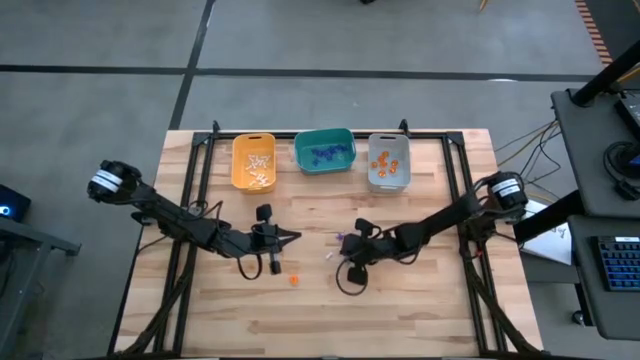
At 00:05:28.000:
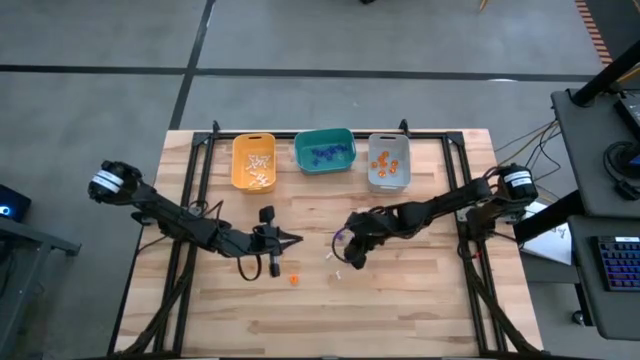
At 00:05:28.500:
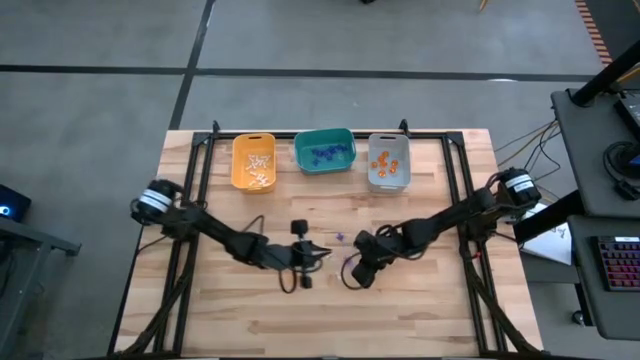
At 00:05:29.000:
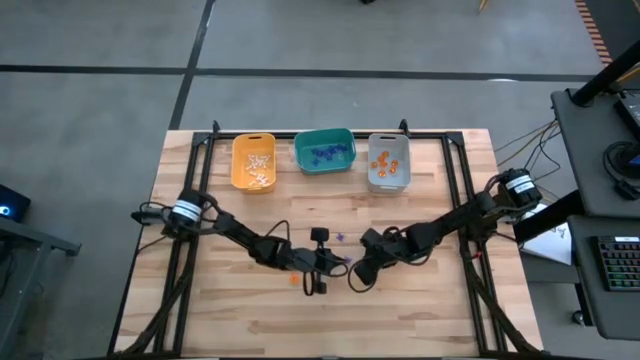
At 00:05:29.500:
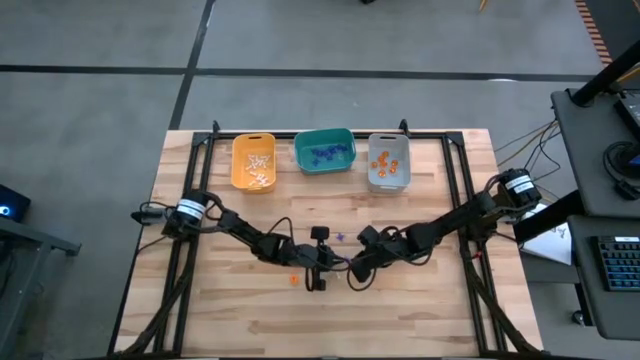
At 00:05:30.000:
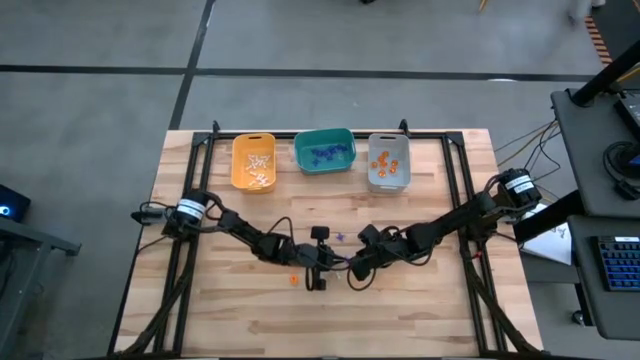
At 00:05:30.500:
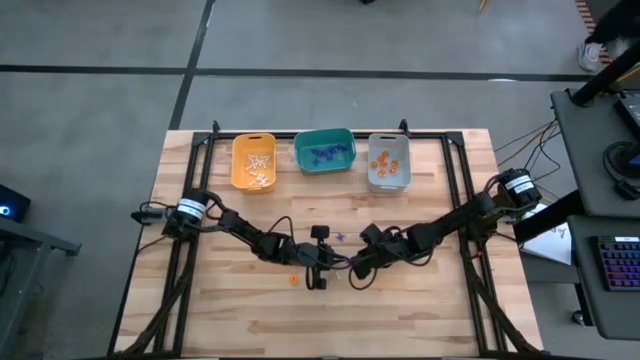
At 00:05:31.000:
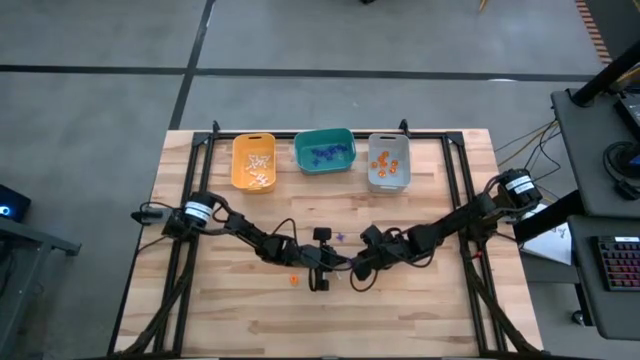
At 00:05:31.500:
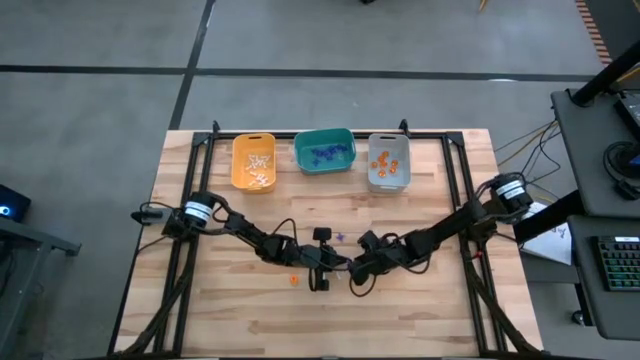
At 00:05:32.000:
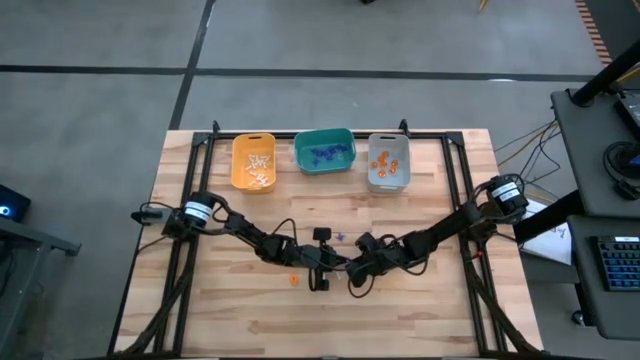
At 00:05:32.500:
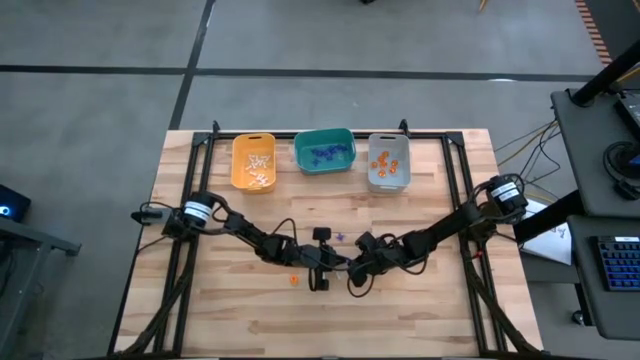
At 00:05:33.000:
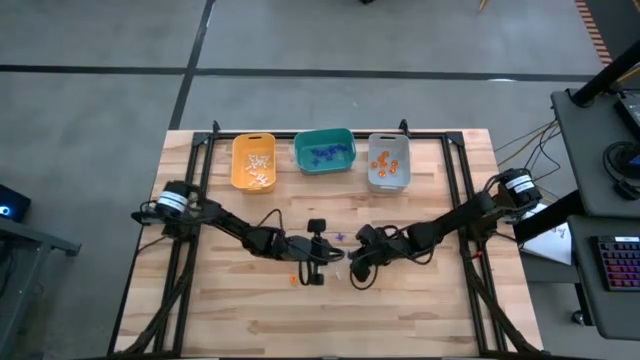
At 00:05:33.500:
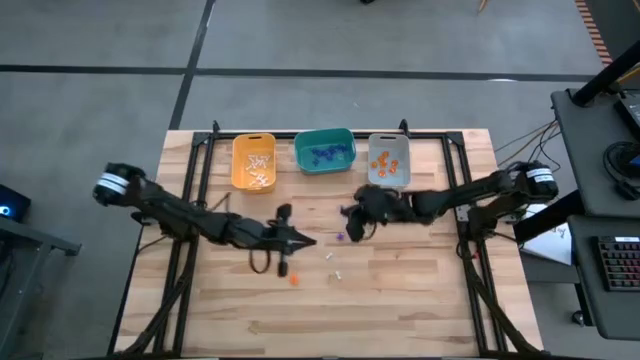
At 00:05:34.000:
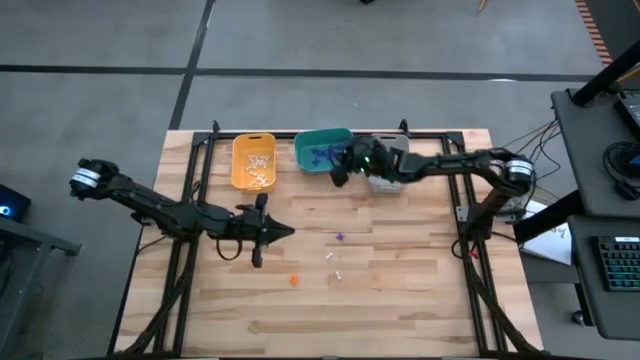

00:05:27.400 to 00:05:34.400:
Task: Sort Halloween decoration
Put the violet spider toy into the green bin

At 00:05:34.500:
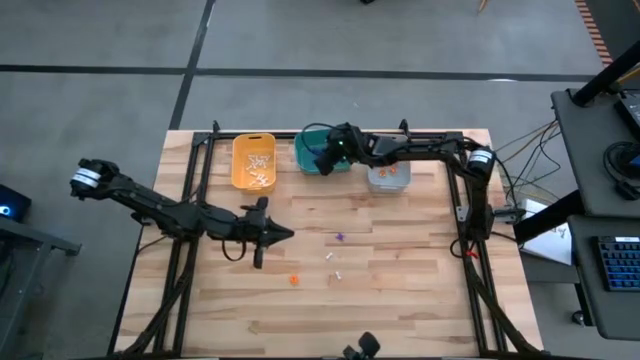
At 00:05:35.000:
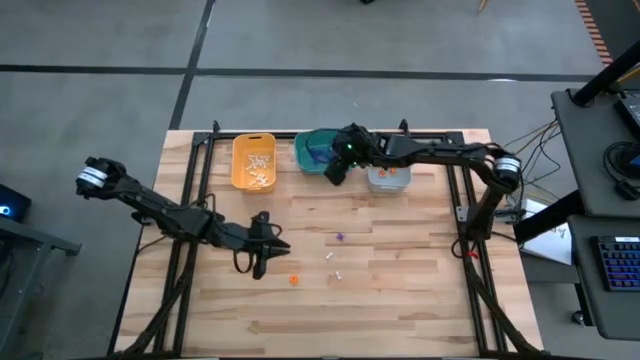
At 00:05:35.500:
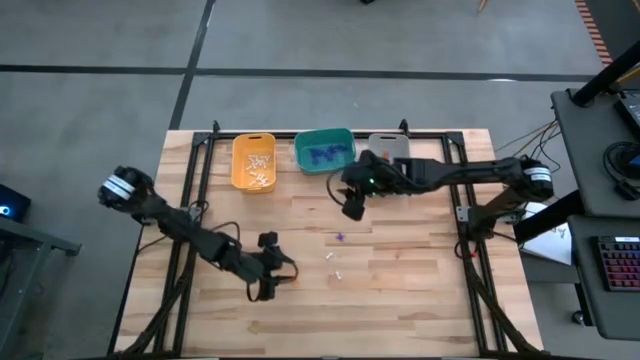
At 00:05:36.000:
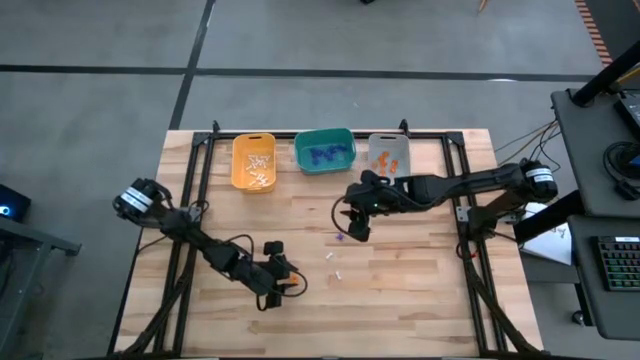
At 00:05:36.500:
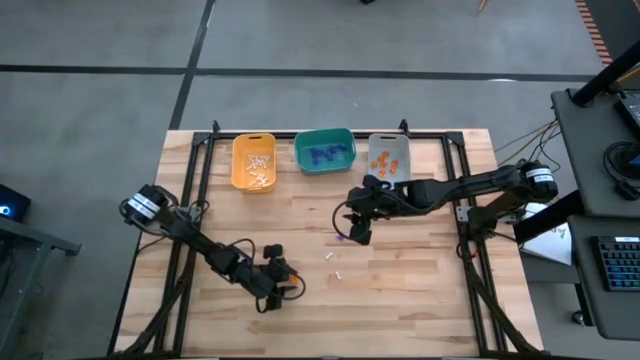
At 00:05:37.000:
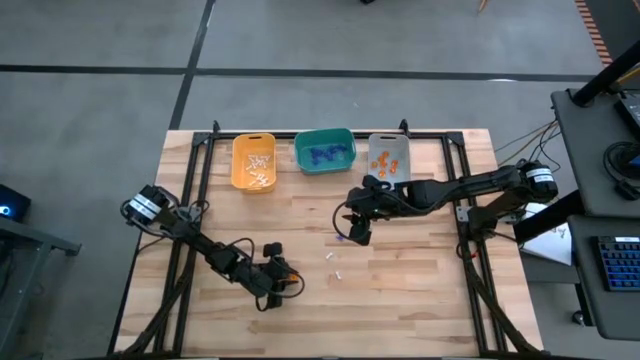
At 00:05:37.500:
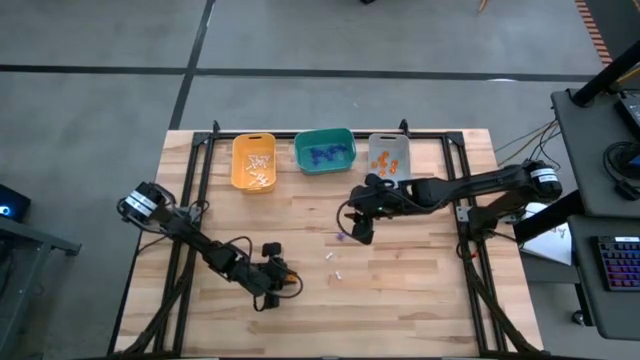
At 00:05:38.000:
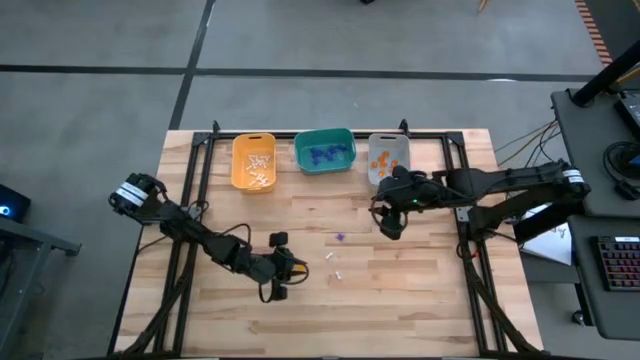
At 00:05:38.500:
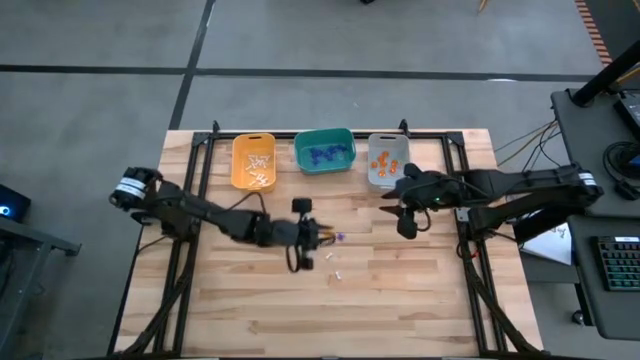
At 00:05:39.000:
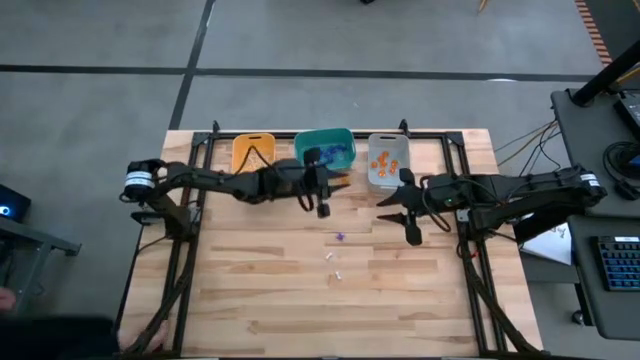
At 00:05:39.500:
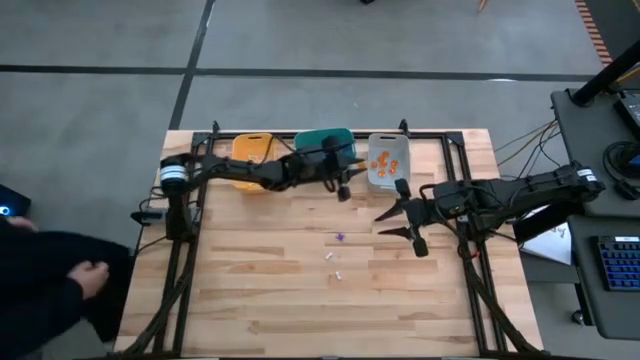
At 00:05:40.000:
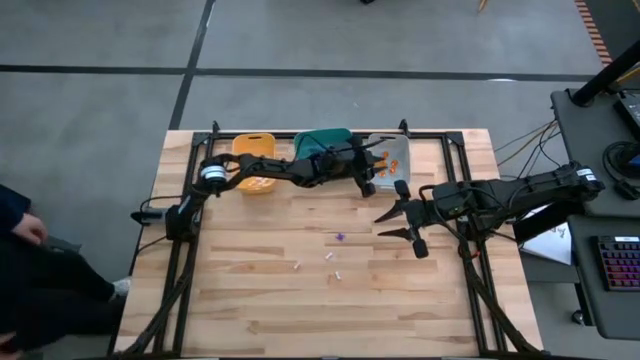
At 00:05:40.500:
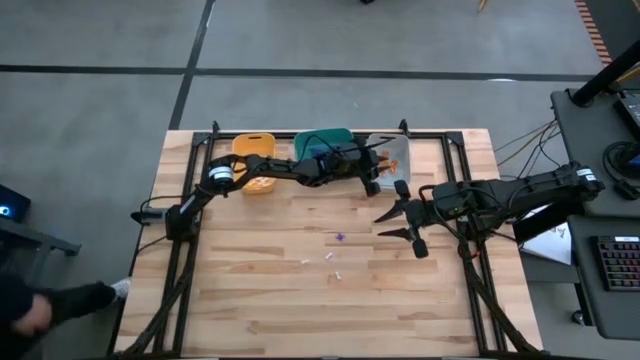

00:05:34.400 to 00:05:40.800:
Put the orange pumpkin into the gray bin

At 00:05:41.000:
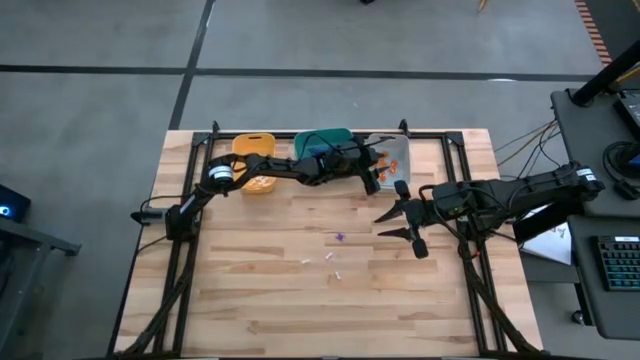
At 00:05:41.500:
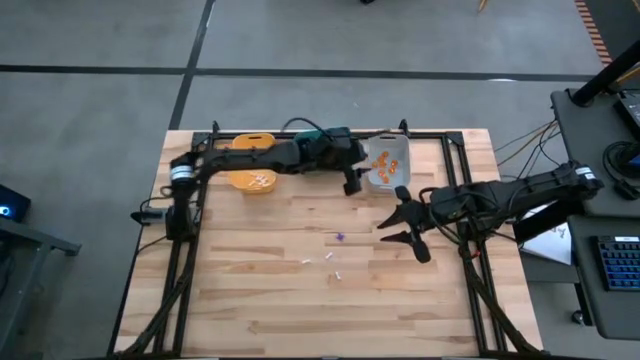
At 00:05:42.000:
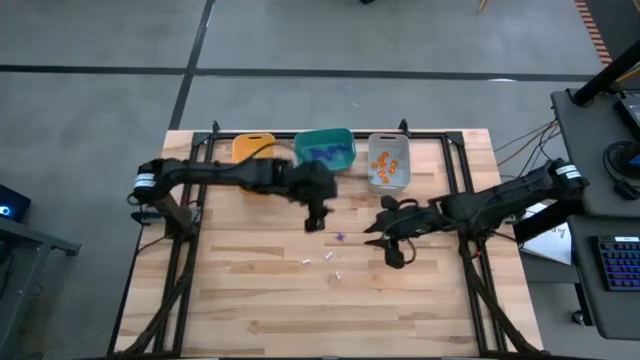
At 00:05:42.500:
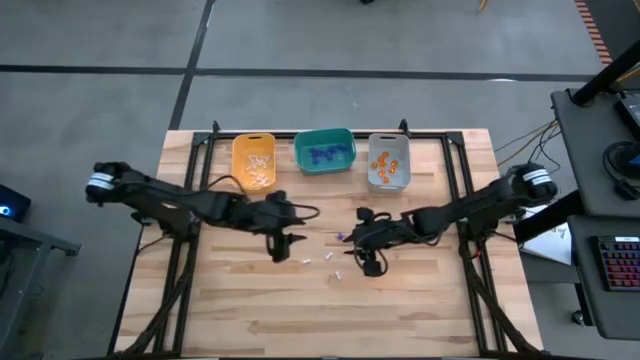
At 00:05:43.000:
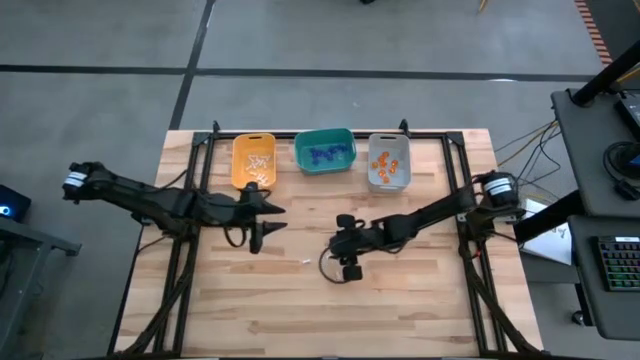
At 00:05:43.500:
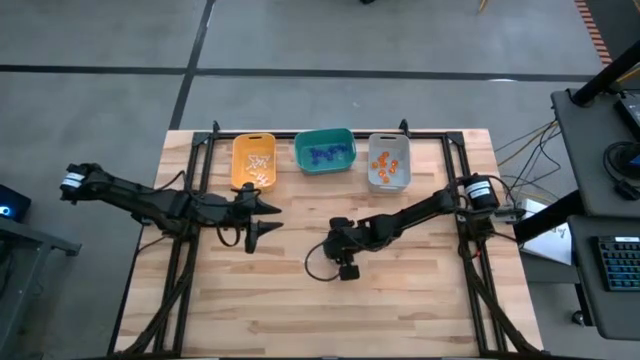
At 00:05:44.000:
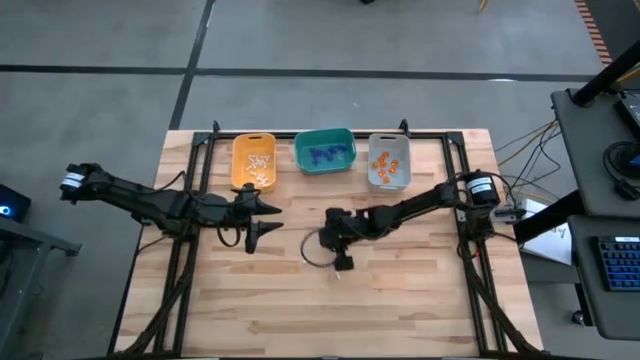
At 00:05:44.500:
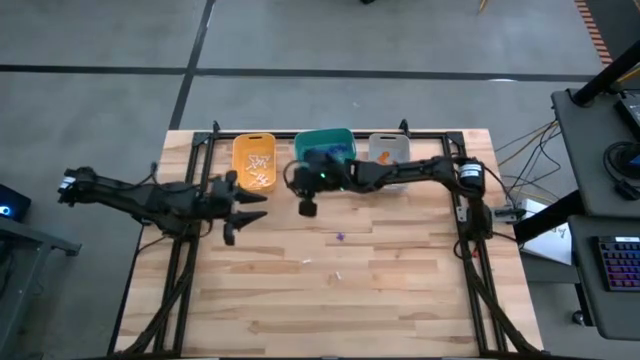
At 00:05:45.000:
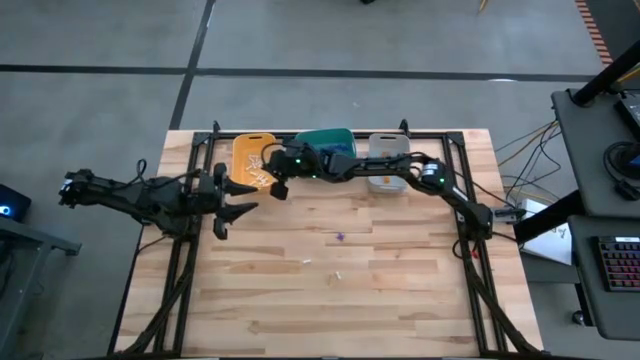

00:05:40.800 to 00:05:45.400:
Put the white bone toy into the yellow bin

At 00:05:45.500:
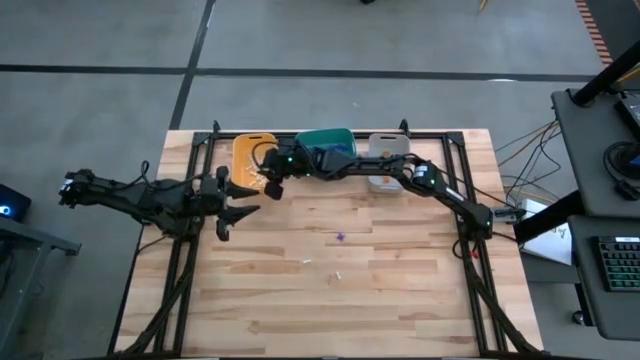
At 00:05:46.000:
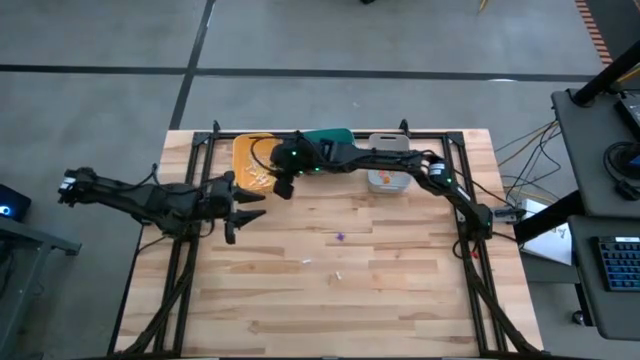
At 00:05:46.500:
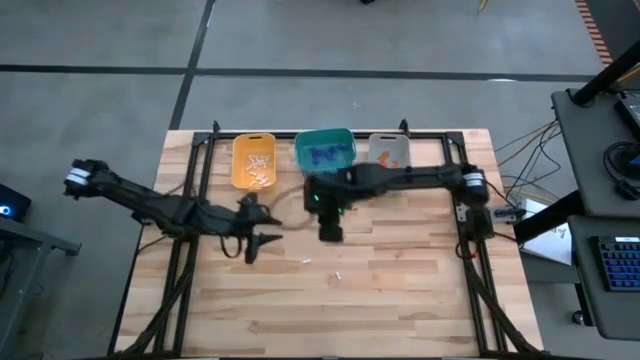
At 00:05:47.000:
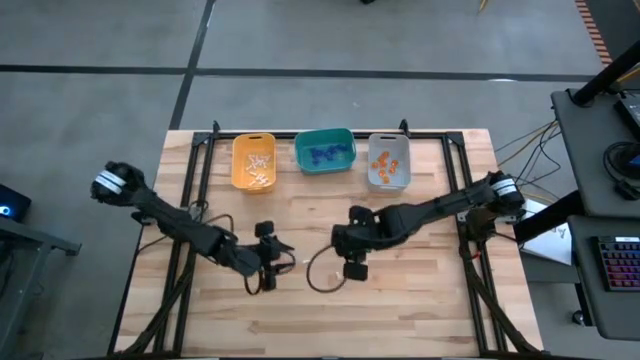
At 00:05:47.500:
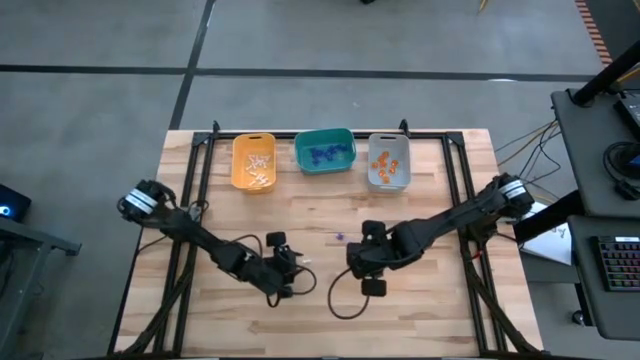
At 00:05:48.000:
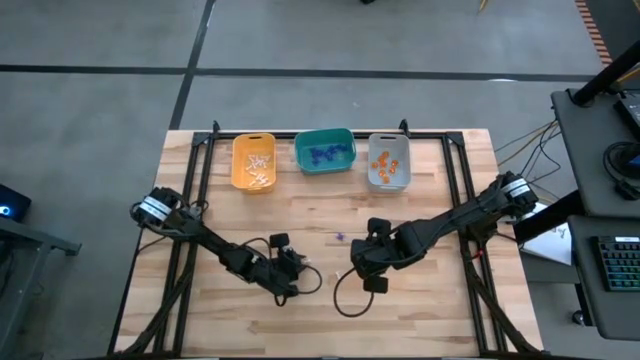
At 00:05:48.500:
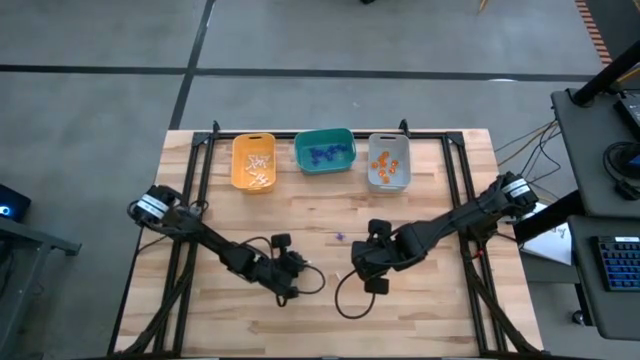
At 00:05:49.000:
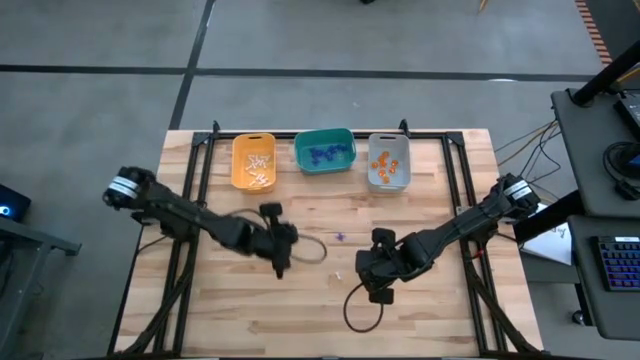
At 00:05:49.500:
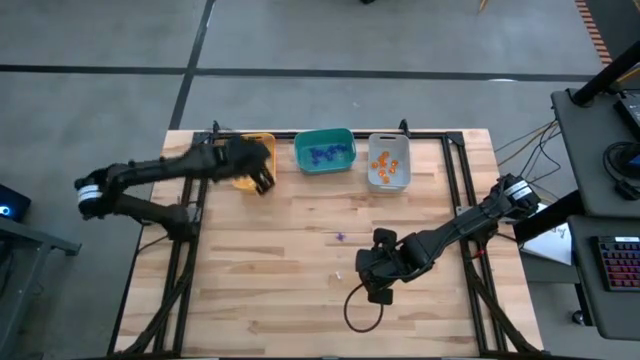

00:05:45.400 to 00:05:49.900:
Put the white bone toy into the yellow bin
